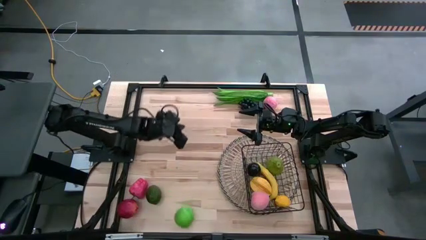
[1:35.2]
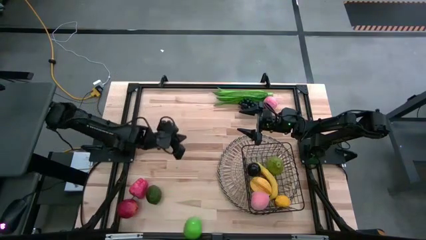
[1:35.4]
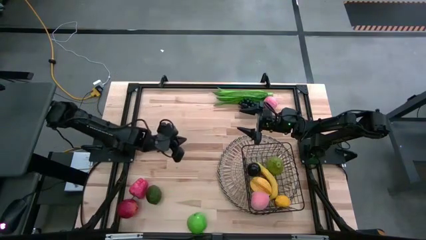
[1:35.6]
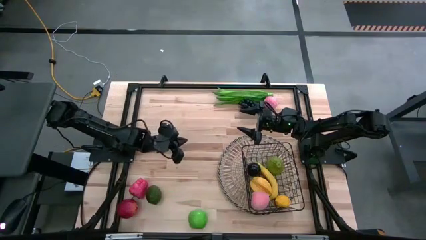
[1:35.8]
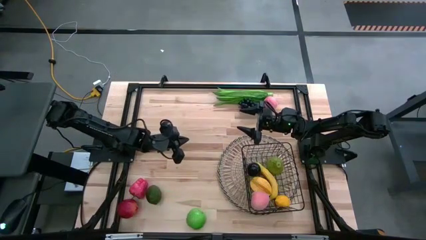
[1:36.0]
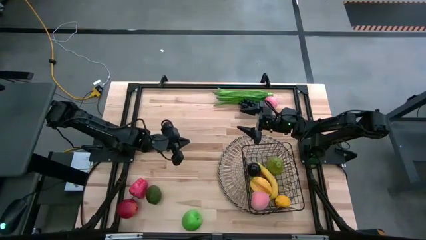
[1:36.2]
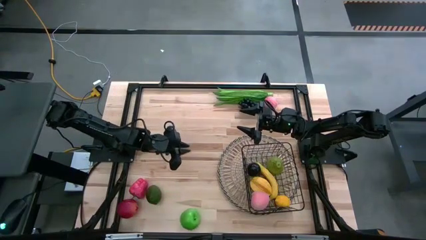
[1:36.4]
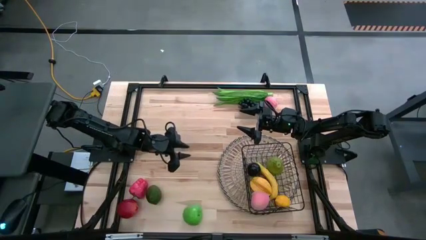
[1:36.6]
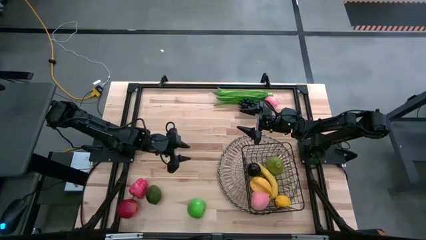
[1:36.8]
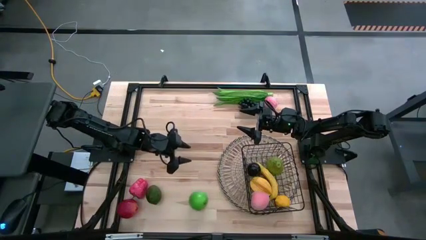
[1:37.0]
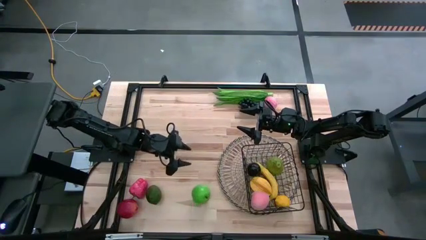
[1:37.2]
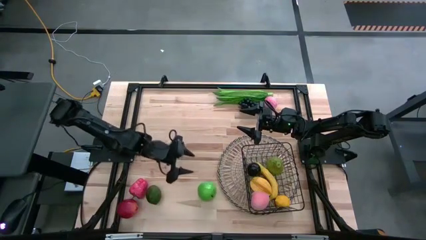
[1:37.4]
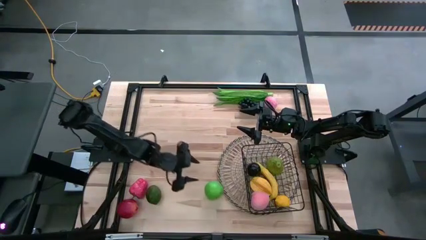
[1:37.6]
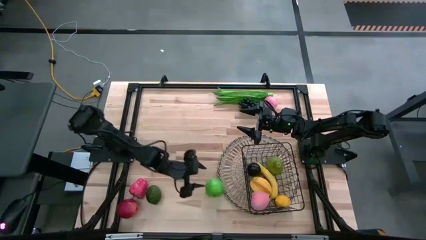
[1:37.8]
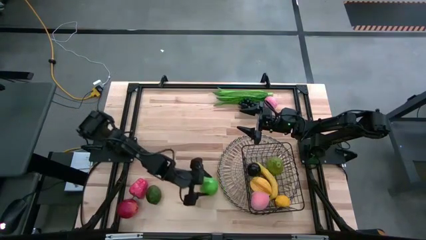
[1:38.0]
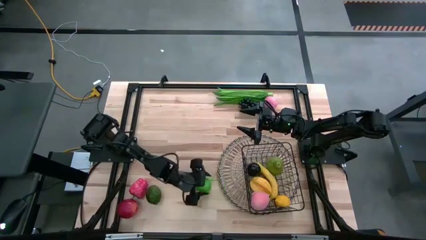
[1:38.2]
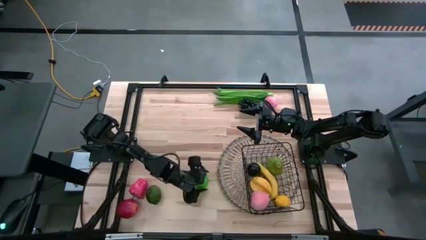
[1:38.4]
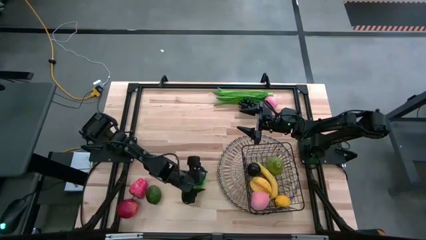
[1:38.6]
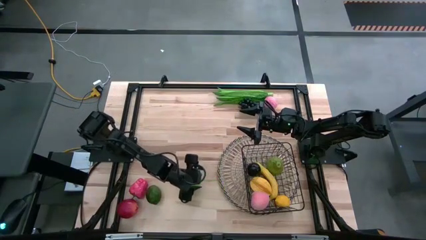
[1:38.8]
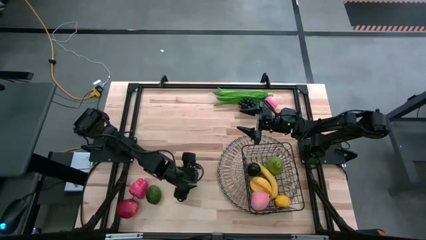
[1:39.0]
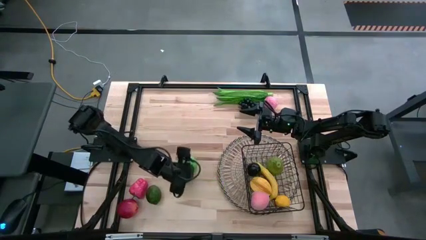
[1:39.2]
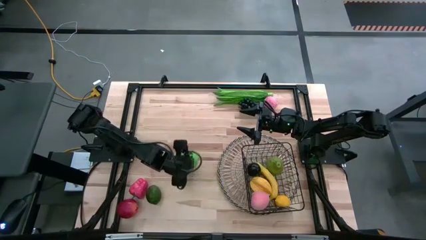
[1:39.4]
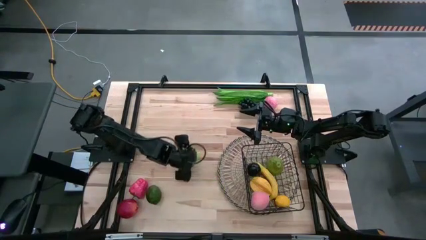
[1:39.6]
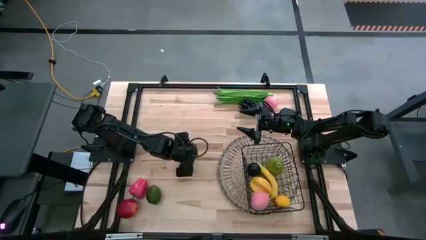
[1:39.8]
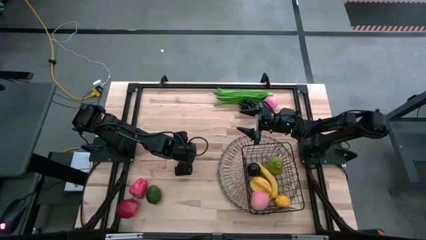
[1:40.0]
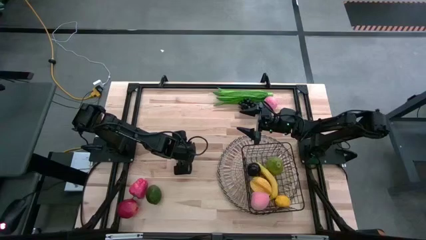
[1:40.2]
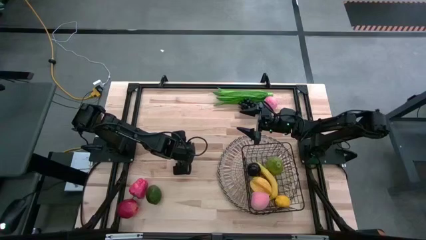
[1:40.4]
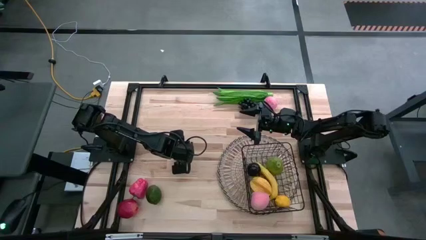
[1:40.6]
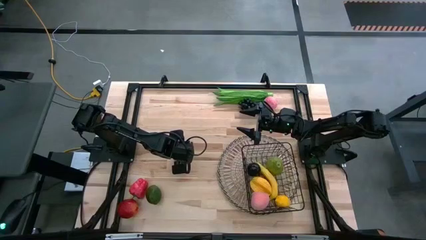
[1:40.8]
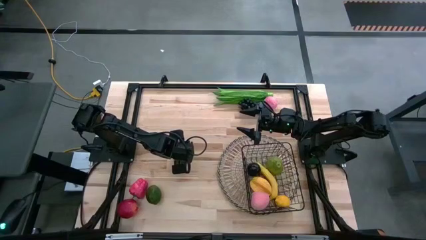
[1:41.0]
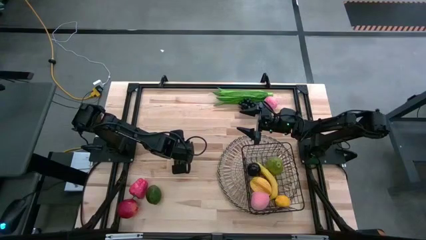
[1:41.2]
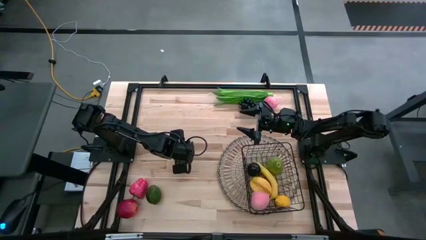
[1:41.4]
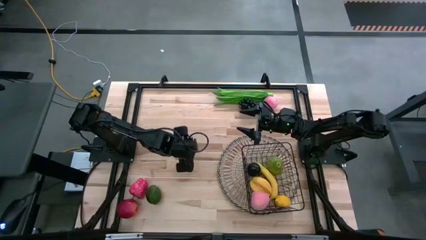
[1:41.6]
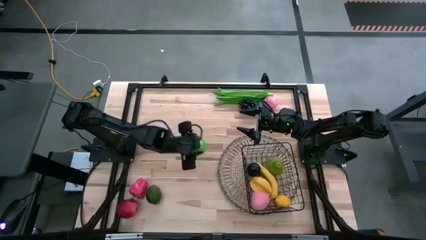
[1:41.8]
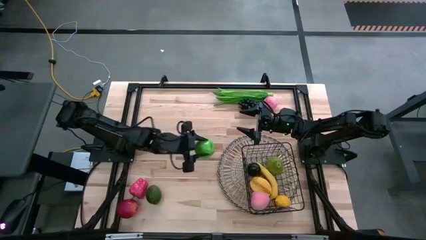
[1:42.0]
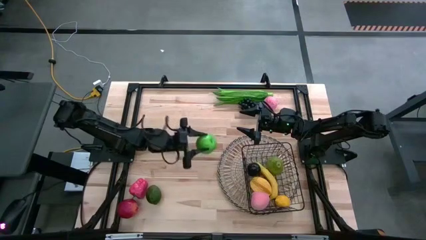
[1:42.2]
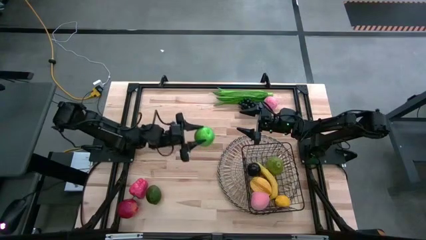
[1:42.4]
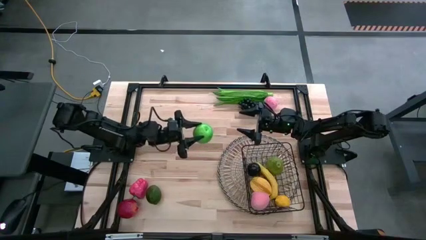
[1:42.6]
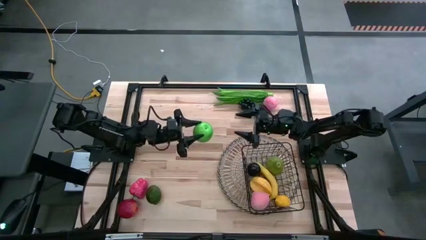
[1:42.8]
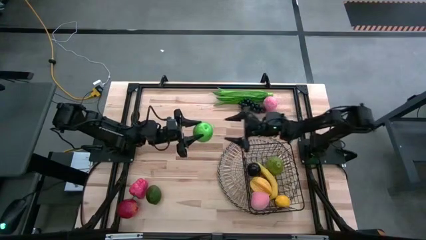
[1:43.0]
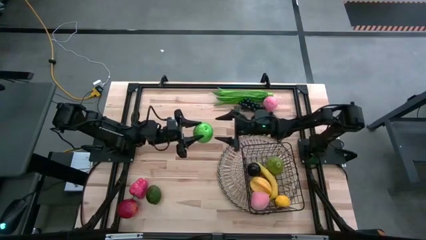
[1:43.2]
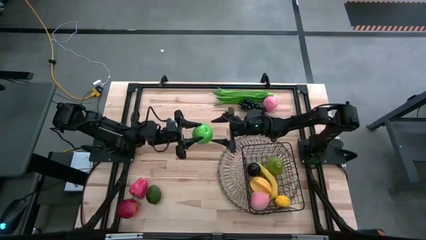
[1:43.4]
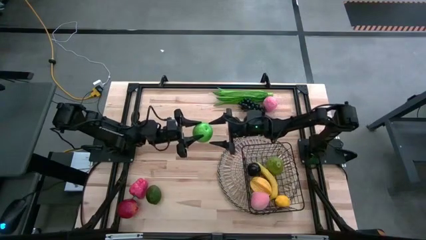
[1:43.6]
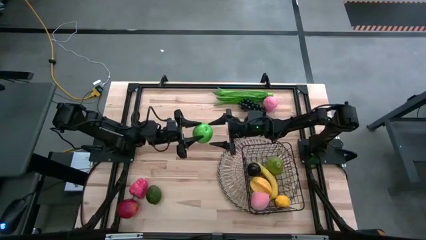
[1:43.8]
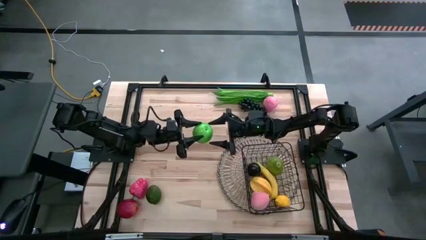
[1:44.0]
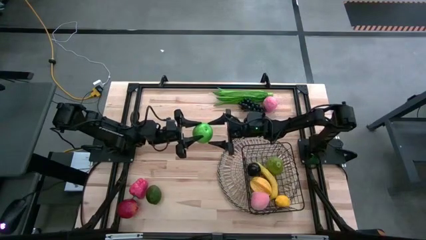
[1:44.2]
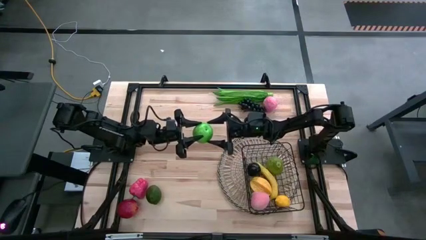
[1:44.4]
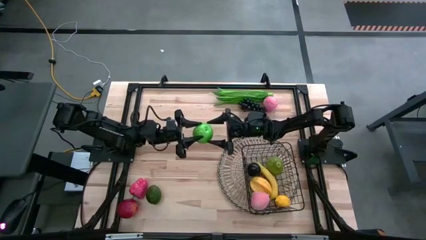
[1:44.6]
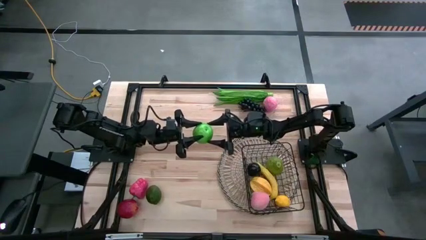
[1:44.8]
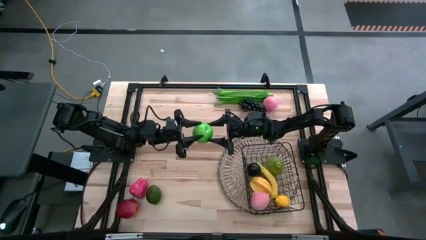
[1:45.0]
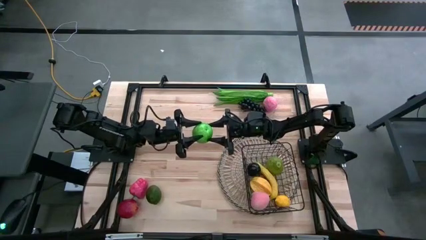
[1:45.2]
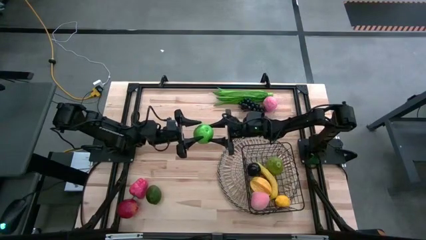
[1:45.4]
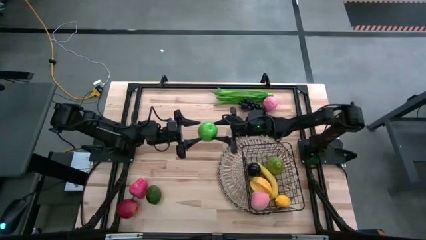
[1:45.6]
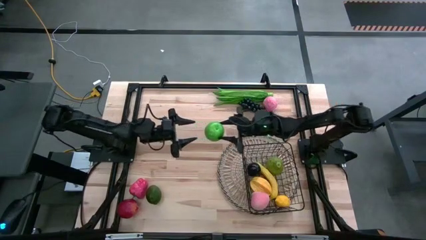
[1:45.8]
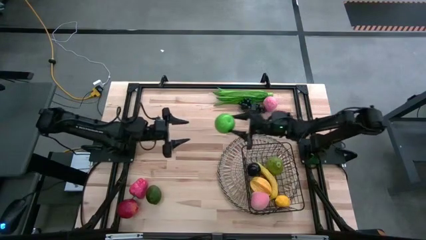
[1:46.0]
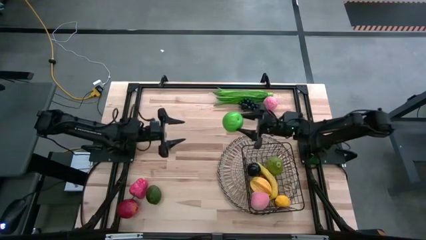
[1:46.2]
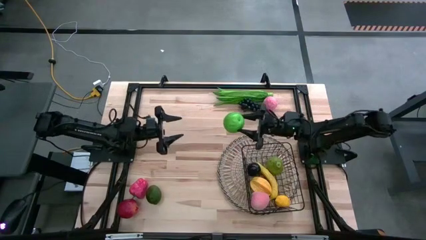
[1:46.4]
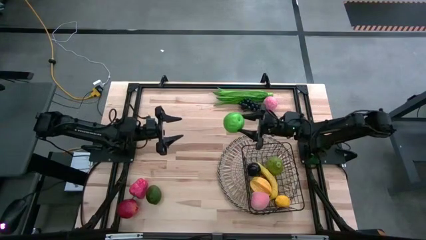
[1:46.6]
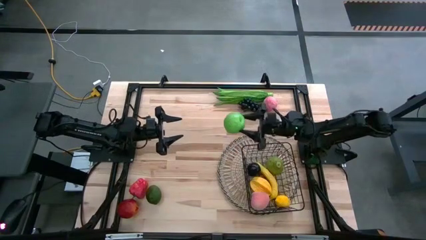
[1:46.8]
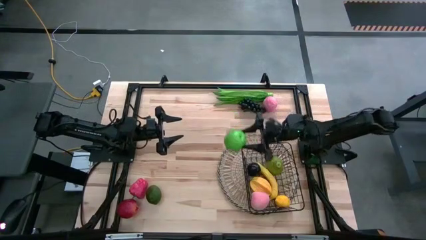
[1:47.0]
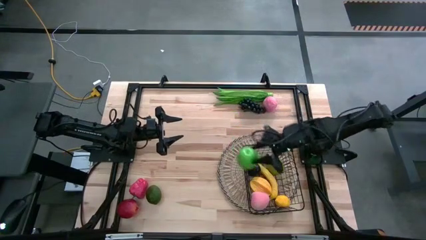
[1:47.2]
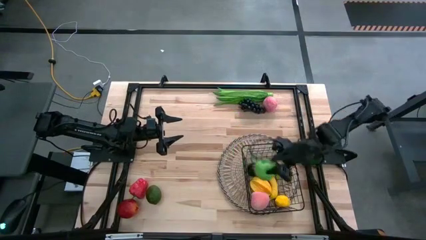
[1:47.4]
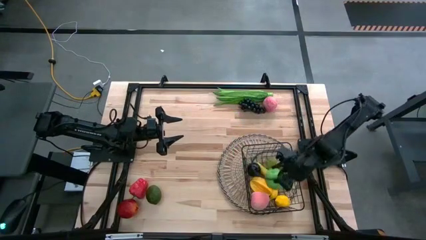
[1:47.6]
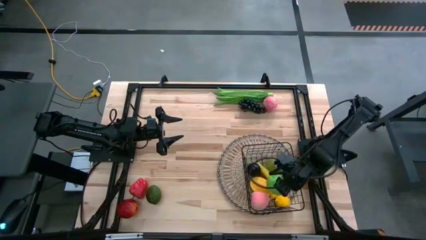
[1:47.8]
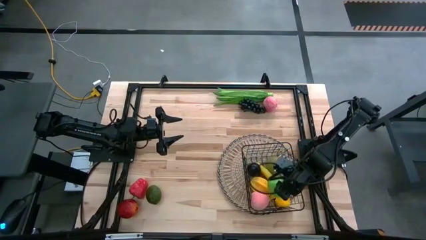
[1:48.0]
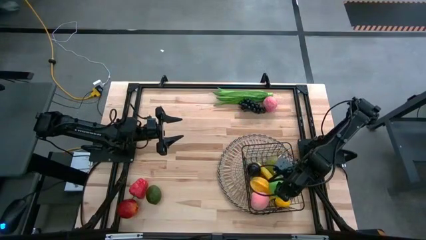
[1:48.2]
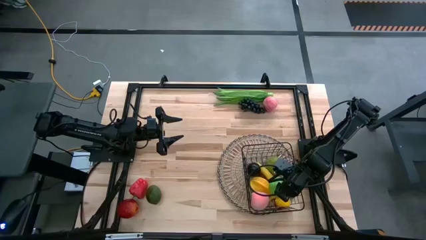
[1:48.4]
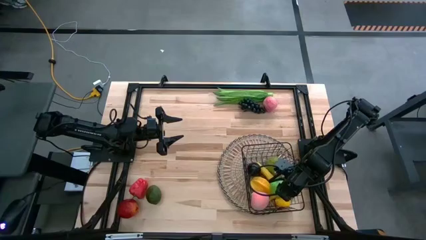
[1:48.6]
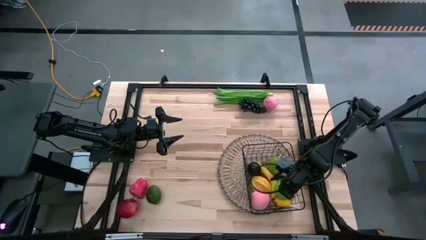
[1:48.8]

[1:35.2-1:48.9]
Task: Build produce basket
Put the green apple into the wire basket
